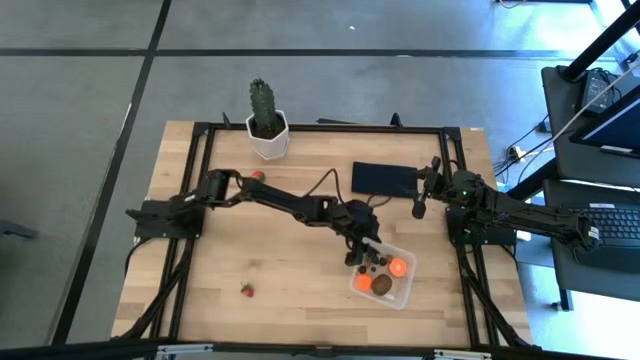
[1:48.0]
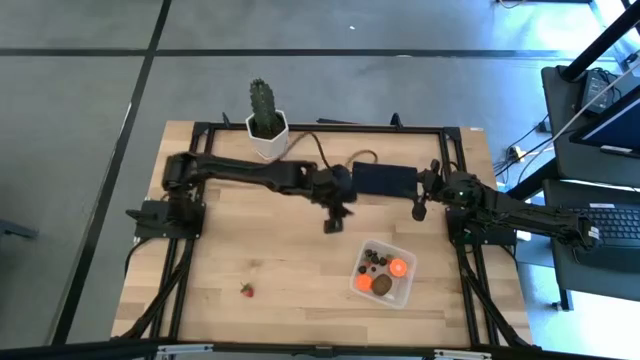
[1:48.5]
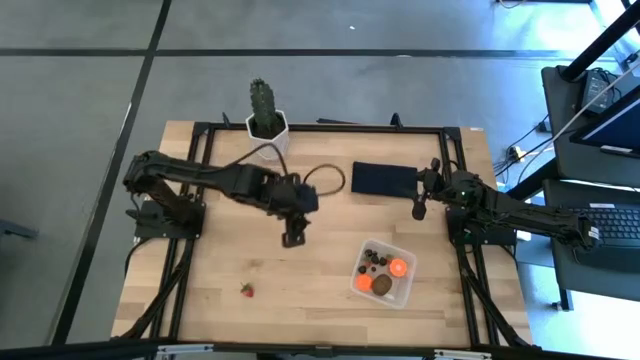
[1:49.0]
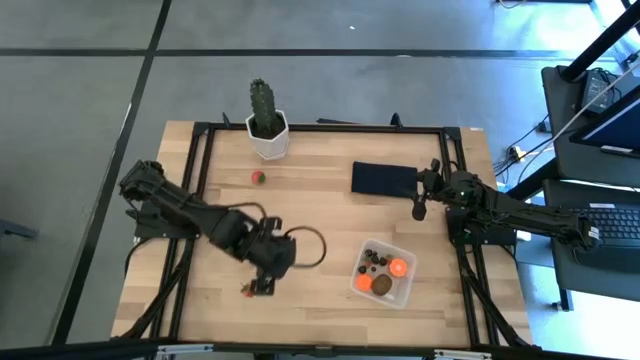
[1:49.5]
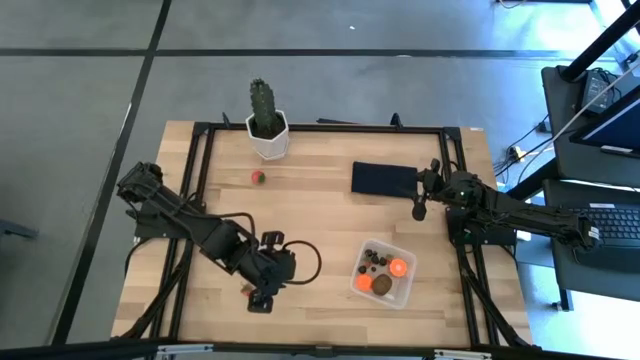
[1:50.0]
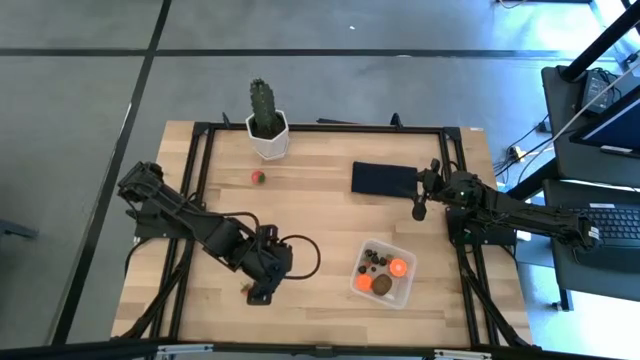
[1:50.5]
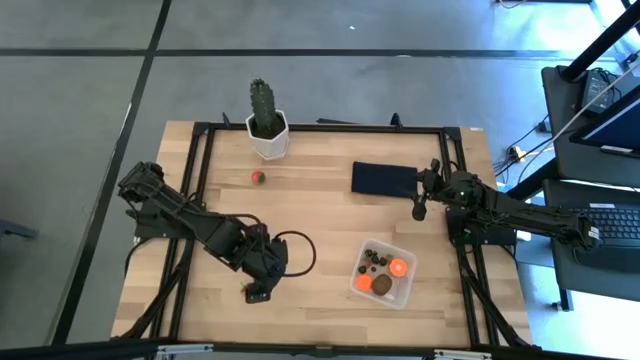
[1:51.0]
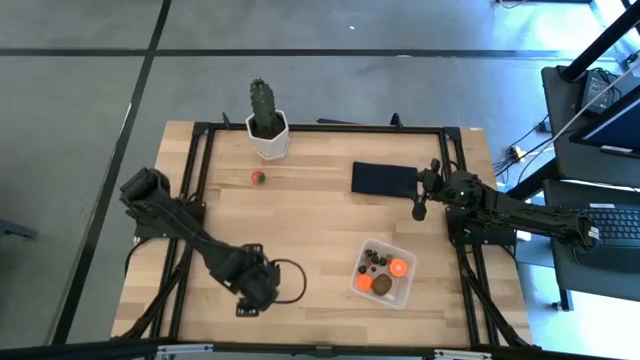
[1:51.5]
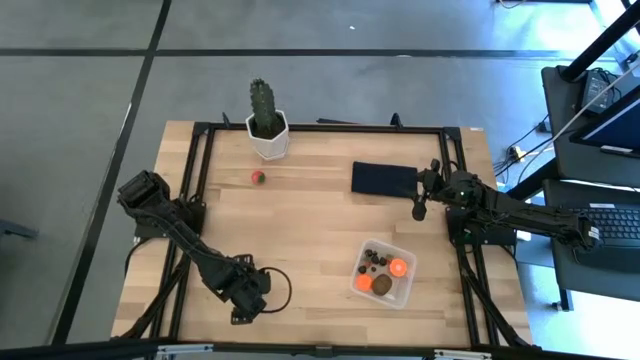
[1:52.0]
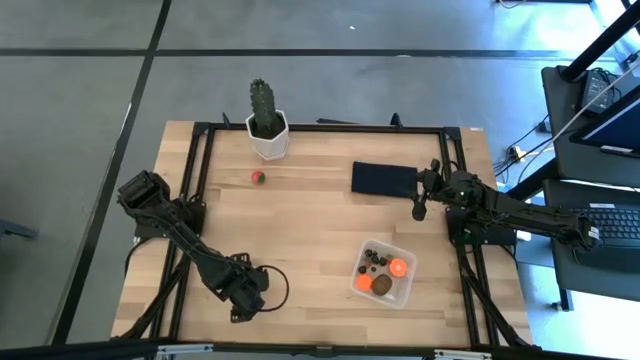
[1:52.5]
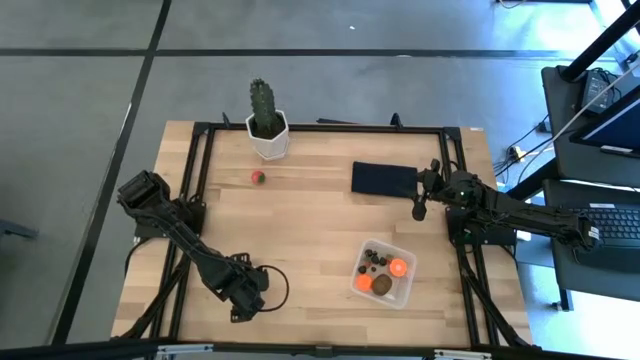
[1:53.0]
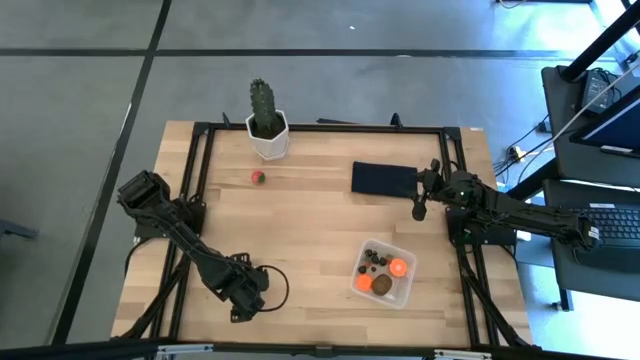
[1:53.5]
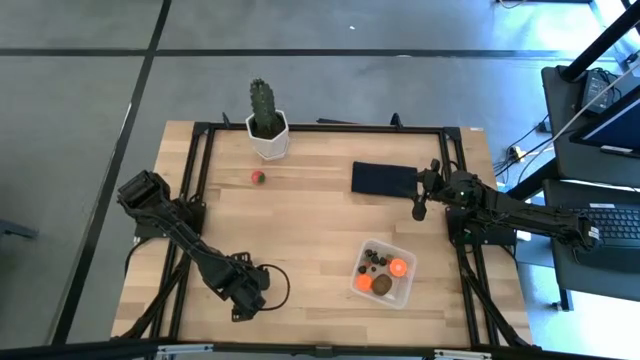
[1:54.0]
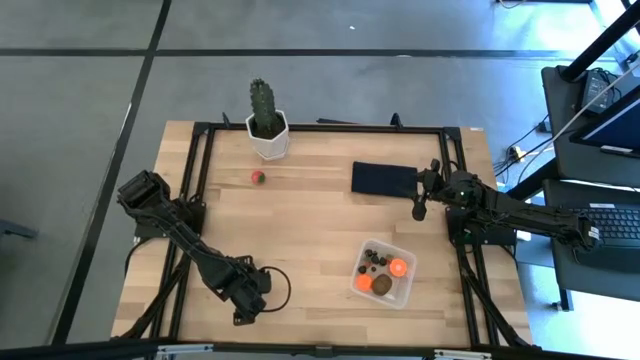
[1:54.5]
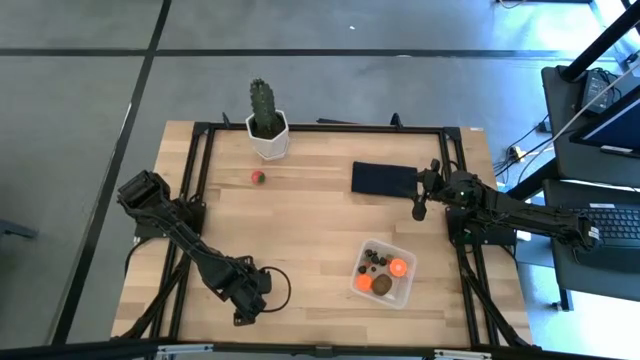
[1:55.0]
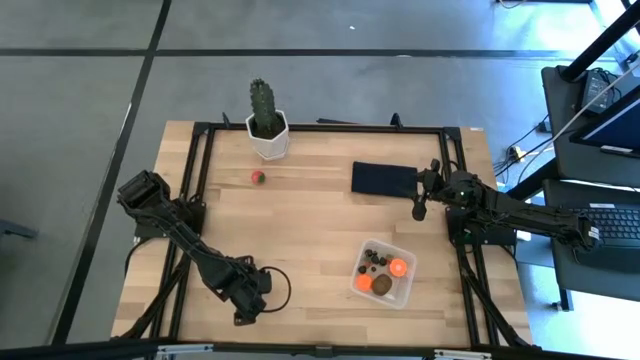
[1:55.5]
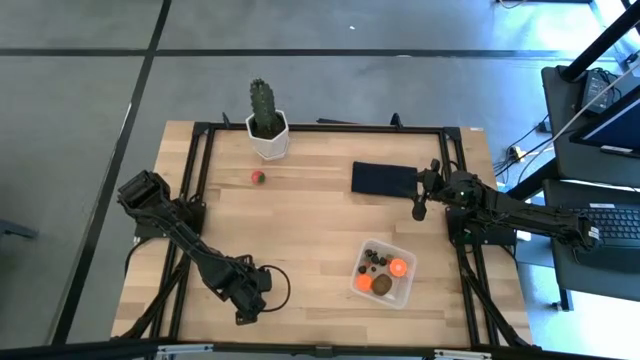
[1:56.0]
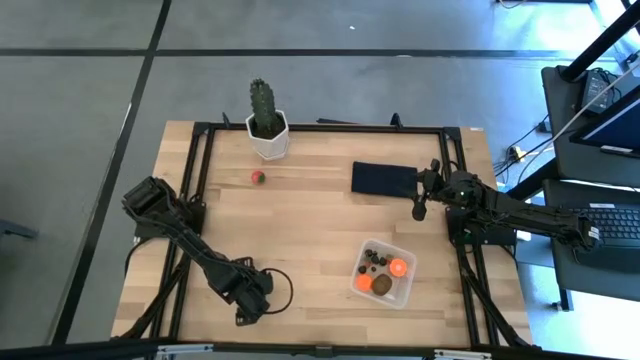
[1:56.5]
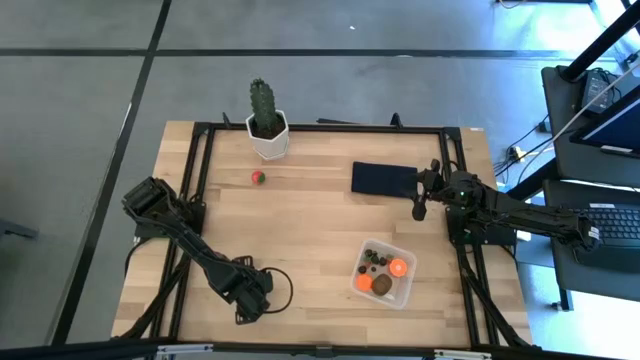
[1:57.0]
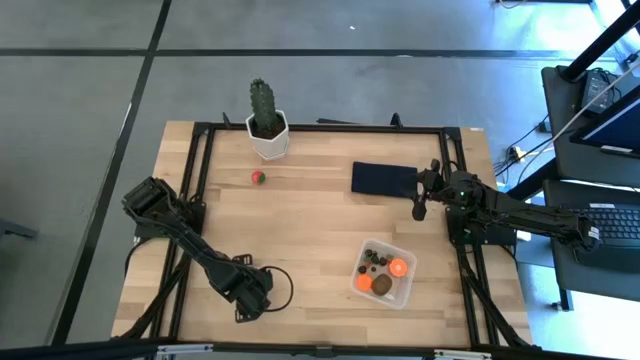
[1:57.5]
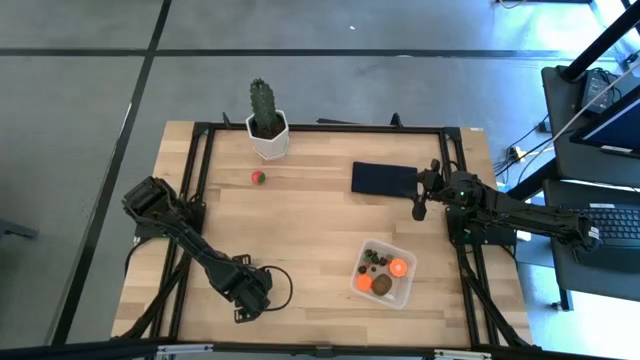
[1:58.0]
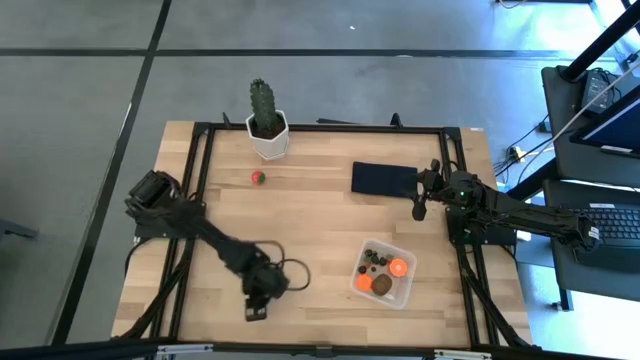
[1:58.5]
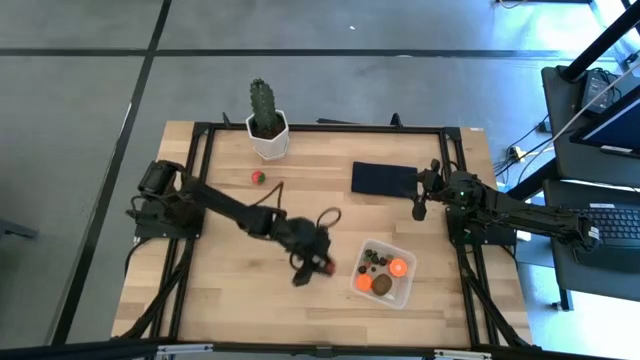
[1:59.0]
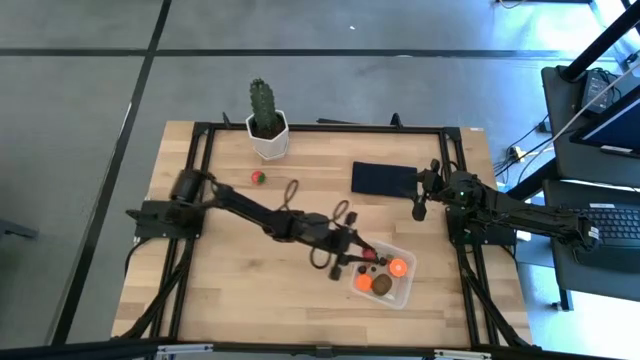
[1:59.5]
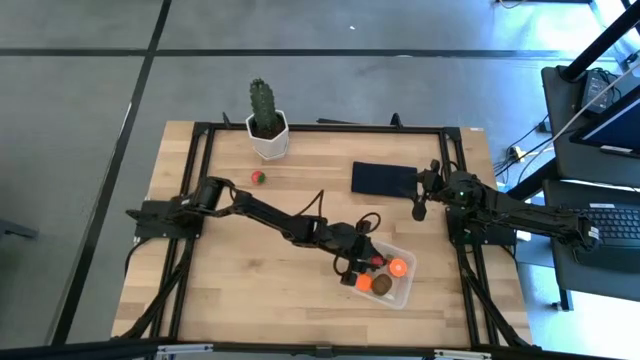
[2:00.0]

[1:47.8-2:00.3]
Task: Pick and placing Produce into tupperware
Put the bottom strawberry into the transparent bin

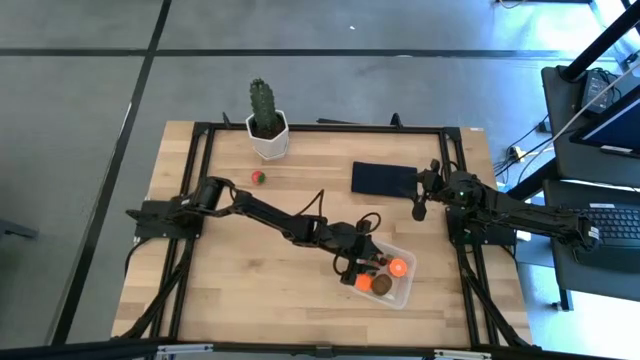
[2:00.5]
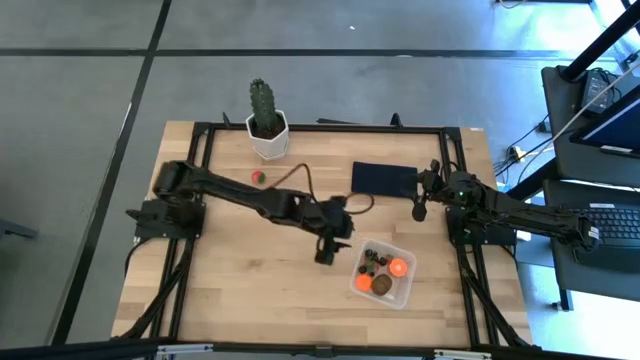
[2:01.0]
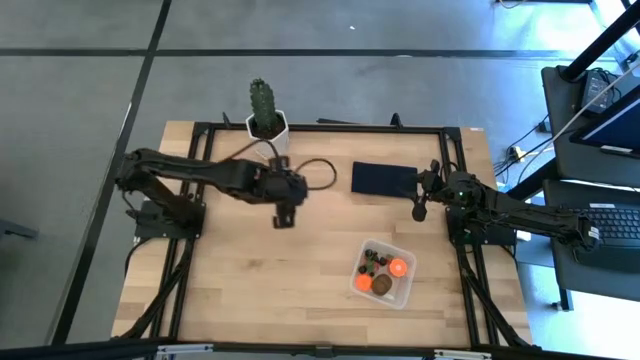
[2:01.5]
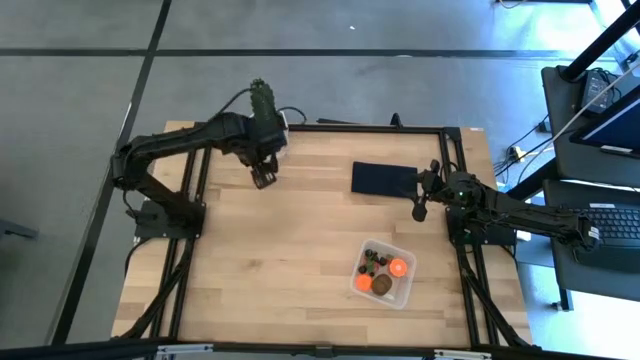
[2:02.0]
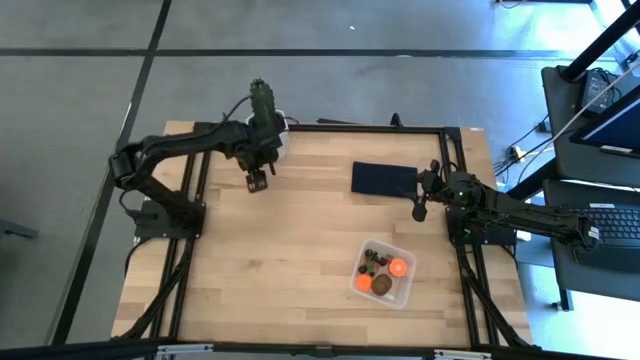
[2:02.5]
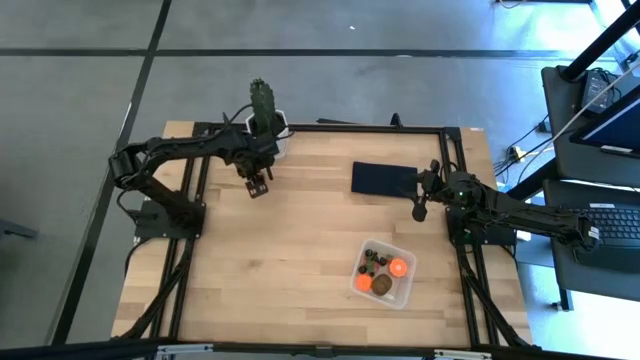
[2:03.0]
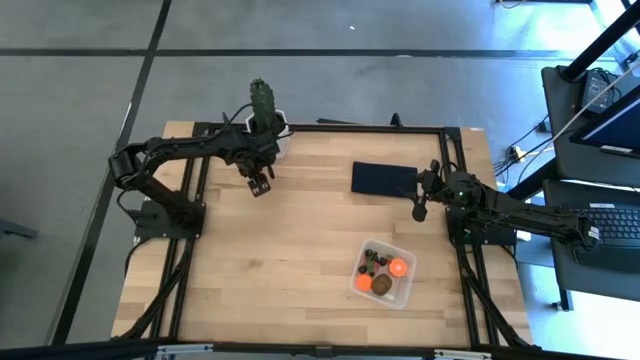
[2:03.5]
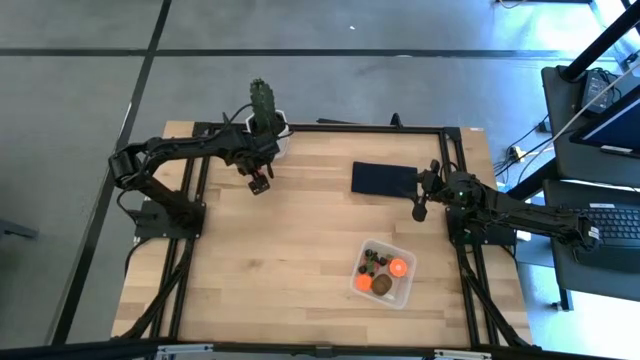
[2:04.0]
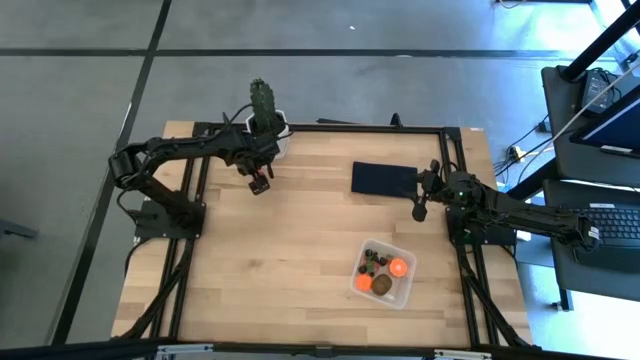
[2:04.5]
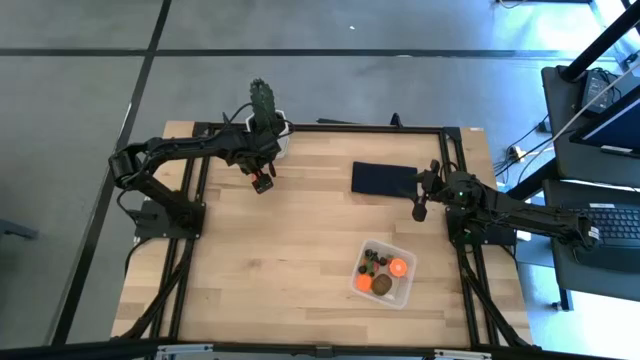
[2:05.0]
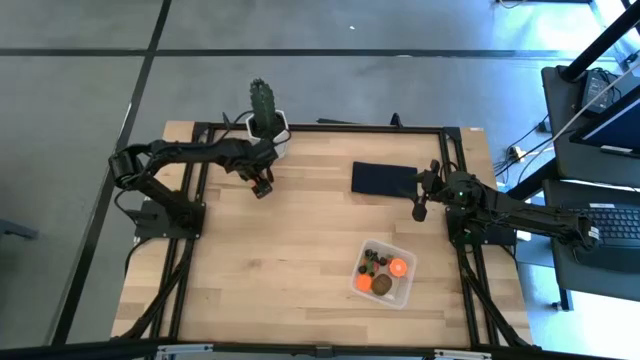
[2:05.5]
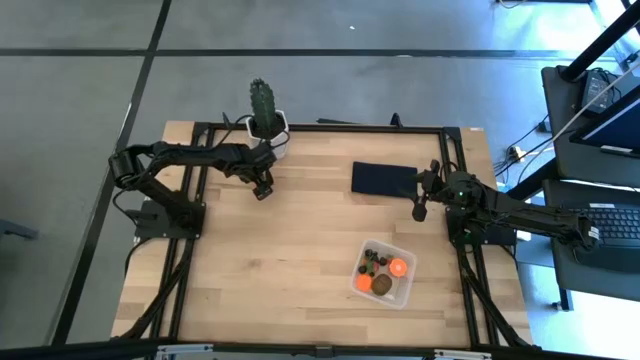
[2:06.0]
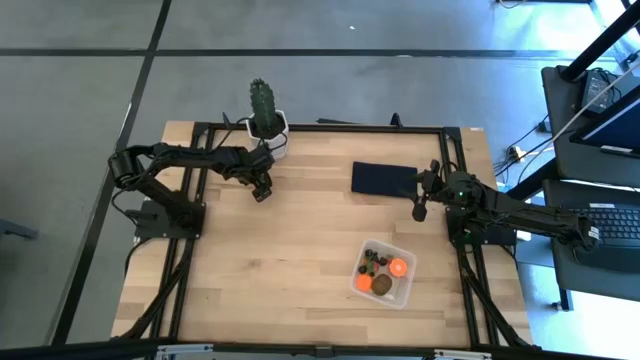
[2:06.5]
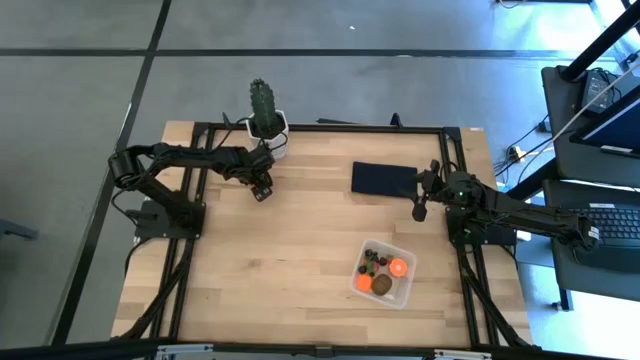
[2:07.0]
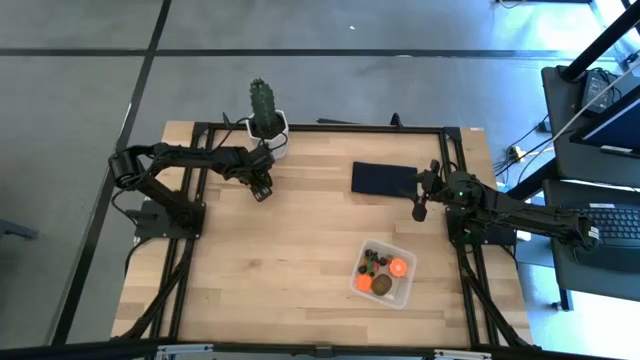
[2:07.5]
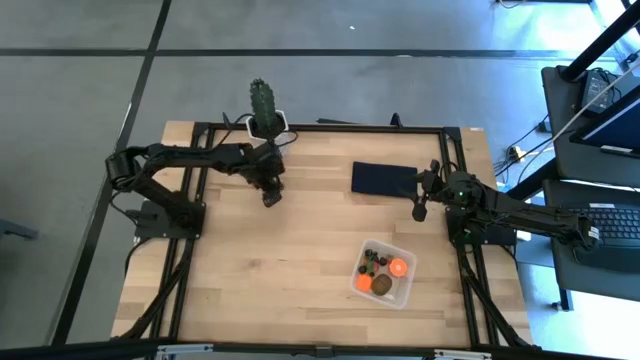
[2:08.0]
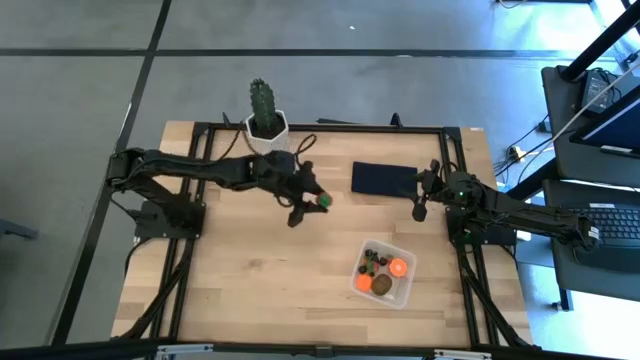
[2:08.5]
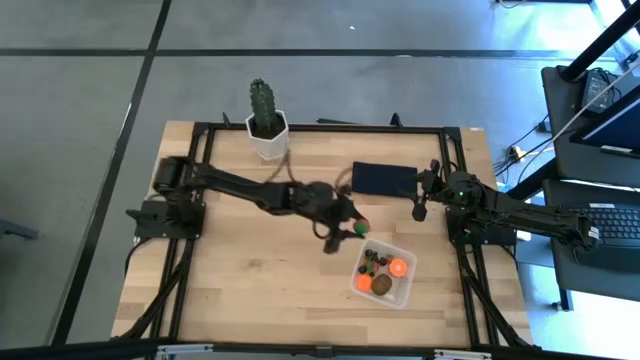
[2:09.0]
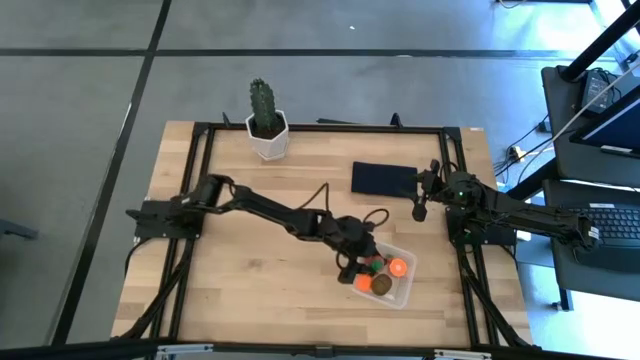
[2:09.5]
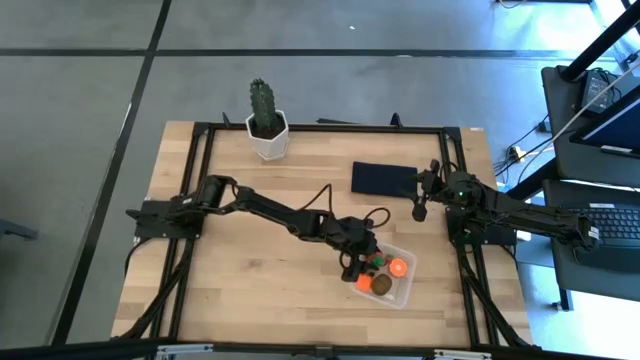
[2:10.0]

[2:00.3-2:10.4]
Put the strawberry into the transparent bin
